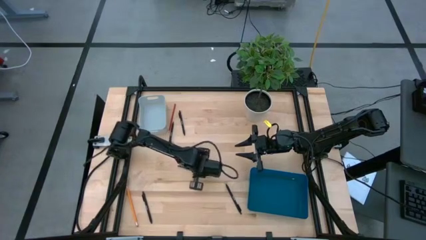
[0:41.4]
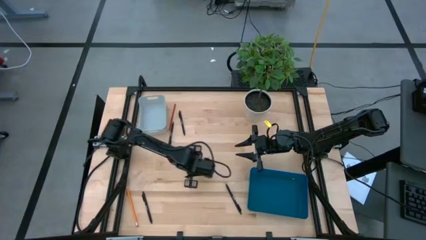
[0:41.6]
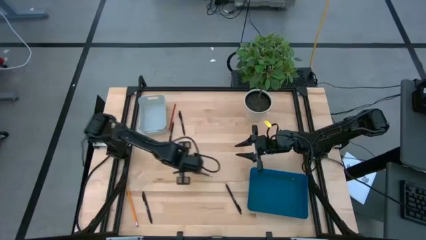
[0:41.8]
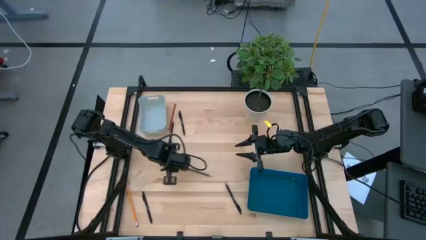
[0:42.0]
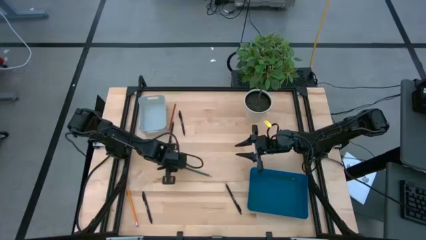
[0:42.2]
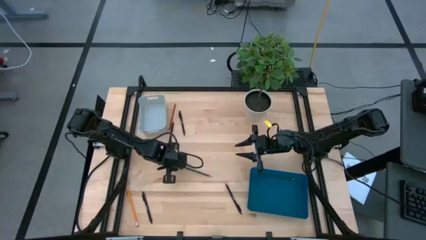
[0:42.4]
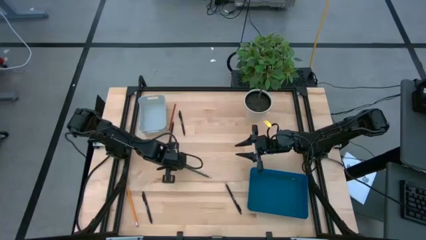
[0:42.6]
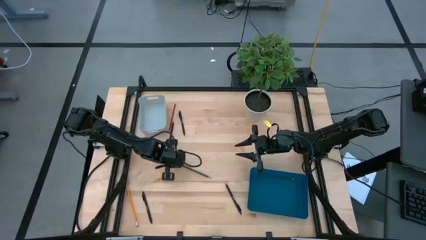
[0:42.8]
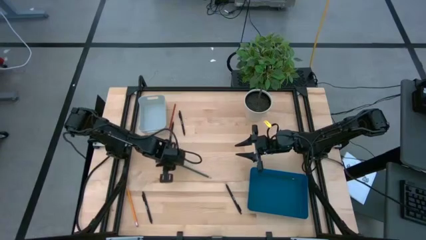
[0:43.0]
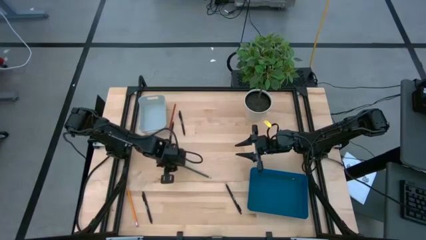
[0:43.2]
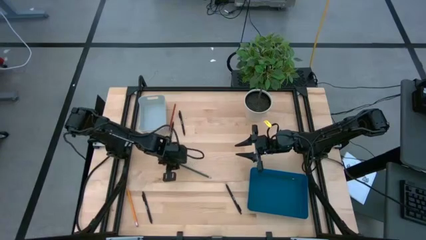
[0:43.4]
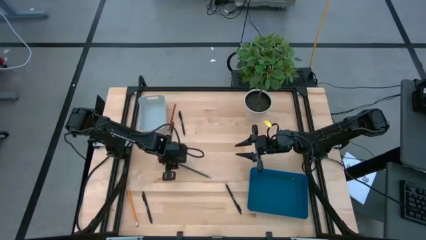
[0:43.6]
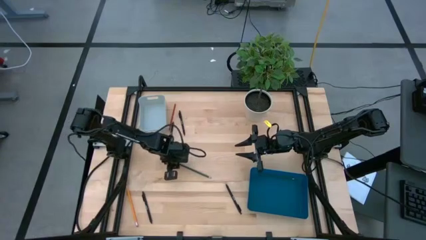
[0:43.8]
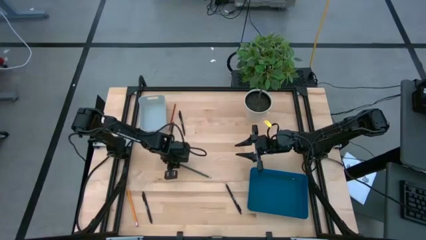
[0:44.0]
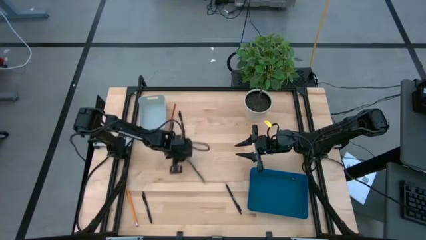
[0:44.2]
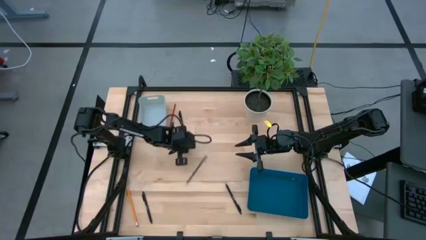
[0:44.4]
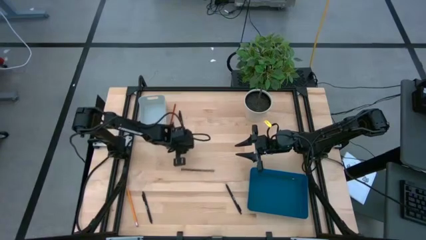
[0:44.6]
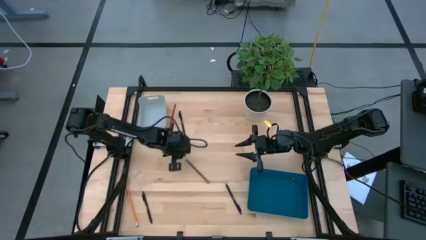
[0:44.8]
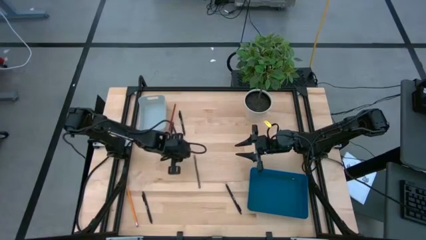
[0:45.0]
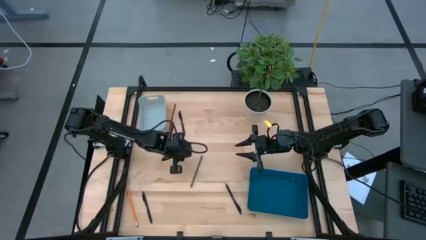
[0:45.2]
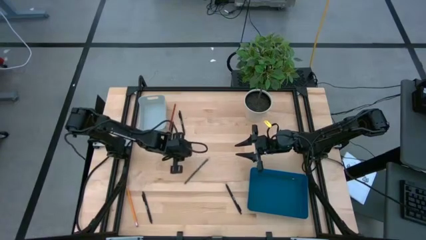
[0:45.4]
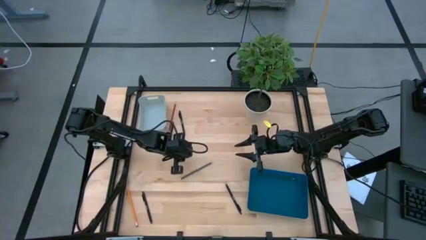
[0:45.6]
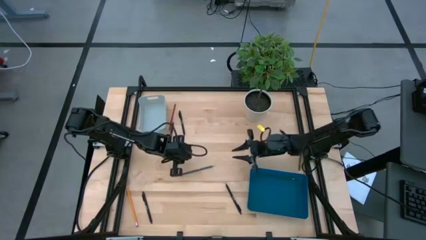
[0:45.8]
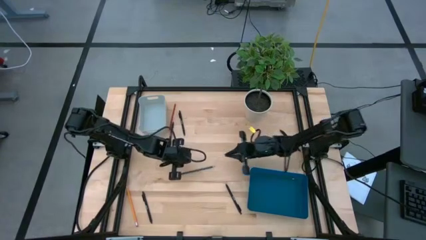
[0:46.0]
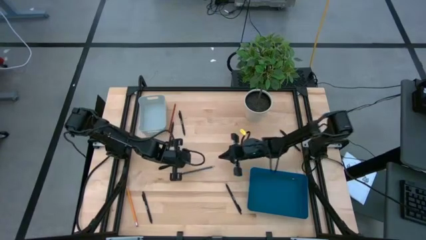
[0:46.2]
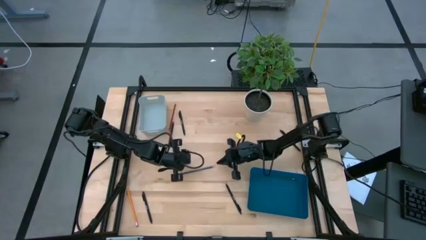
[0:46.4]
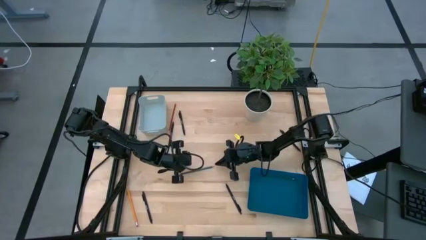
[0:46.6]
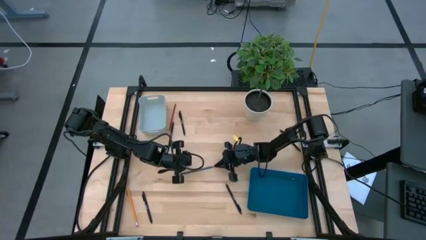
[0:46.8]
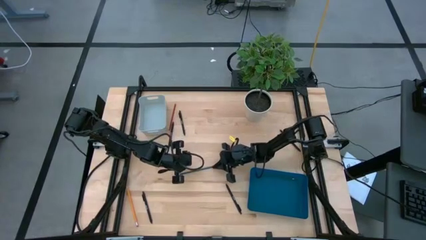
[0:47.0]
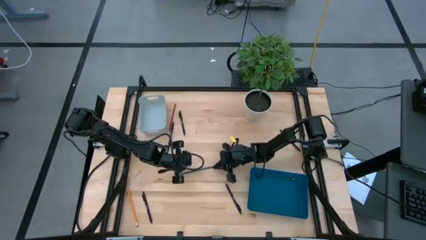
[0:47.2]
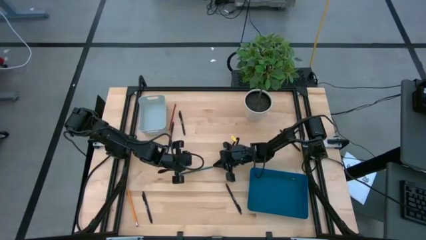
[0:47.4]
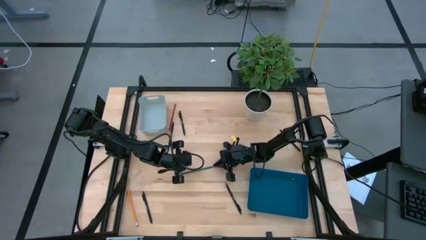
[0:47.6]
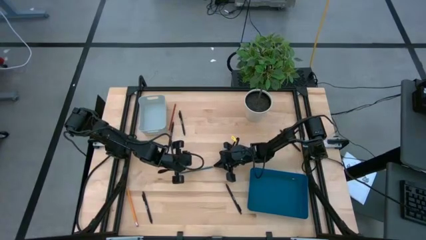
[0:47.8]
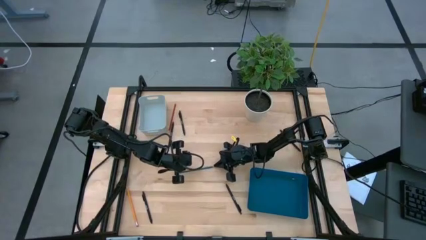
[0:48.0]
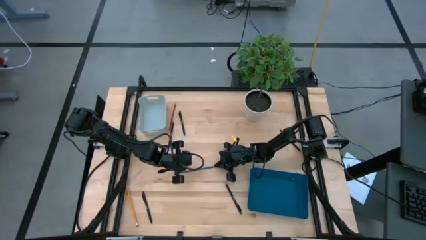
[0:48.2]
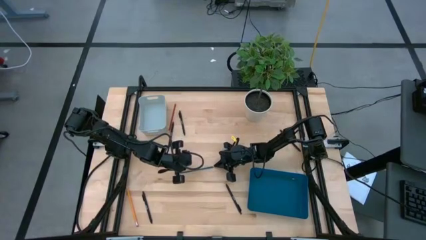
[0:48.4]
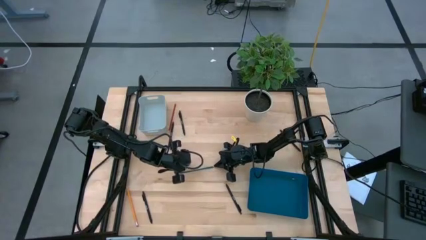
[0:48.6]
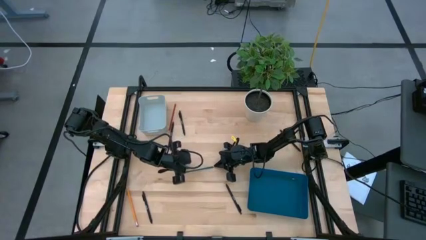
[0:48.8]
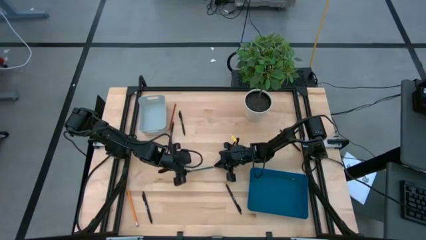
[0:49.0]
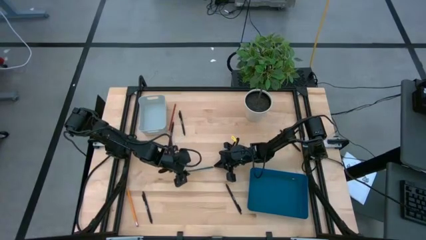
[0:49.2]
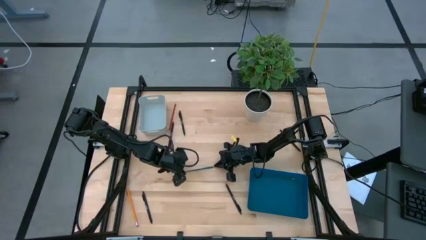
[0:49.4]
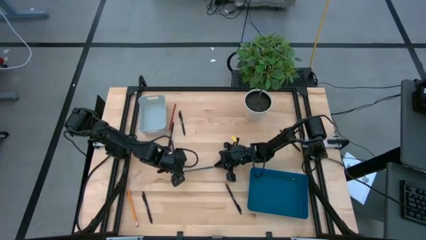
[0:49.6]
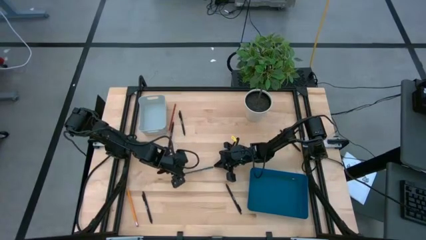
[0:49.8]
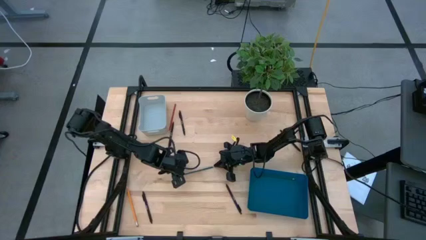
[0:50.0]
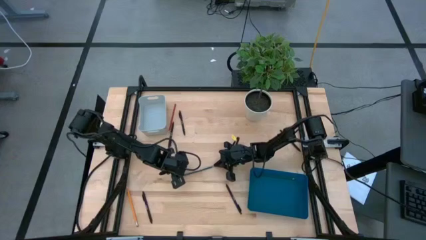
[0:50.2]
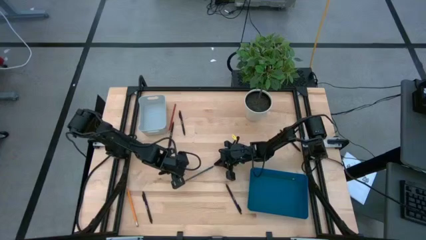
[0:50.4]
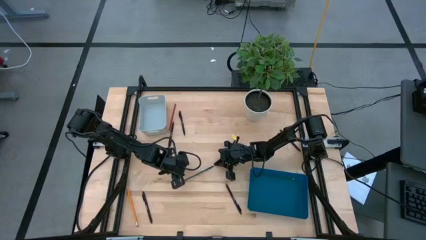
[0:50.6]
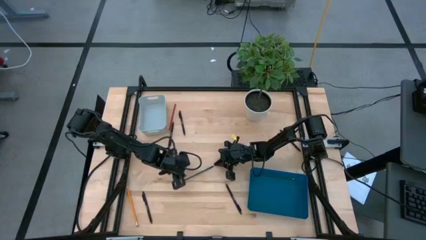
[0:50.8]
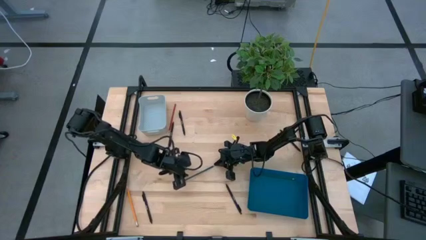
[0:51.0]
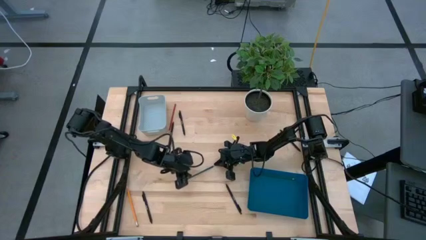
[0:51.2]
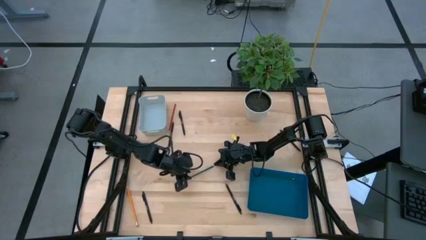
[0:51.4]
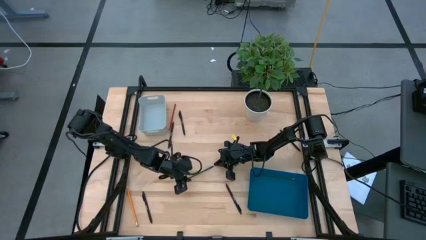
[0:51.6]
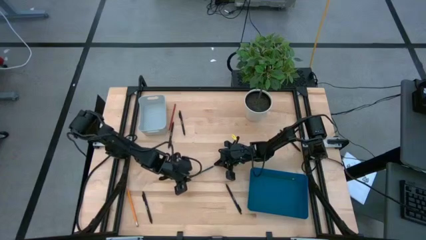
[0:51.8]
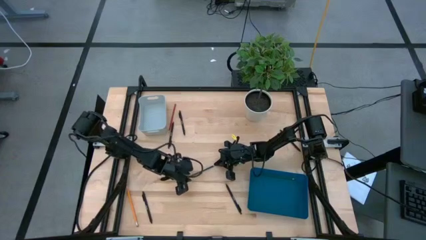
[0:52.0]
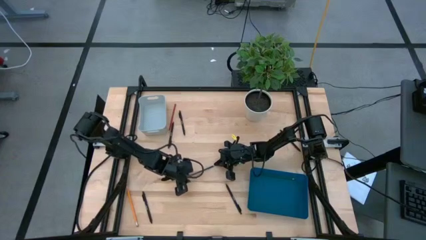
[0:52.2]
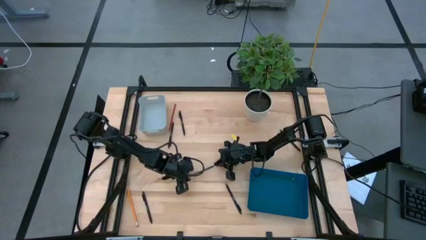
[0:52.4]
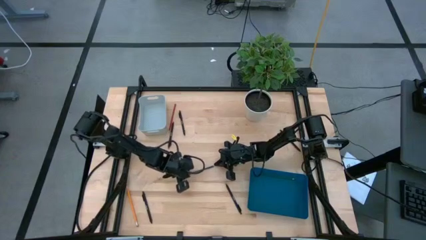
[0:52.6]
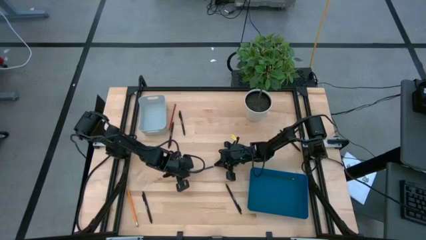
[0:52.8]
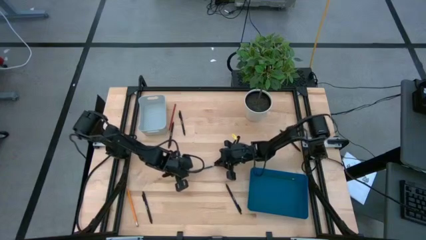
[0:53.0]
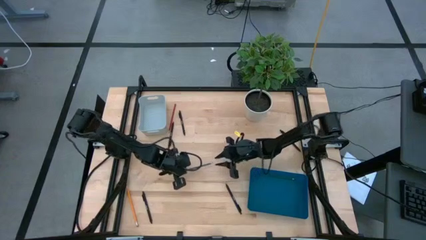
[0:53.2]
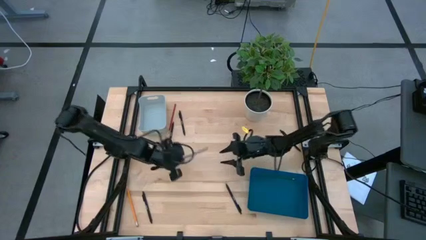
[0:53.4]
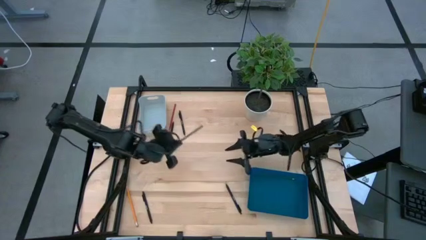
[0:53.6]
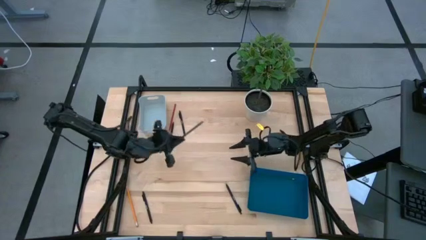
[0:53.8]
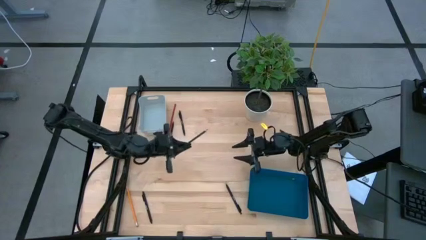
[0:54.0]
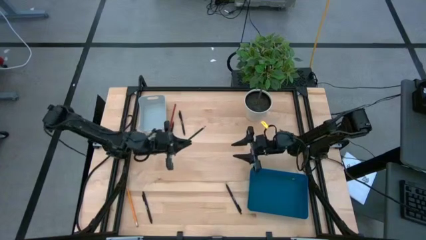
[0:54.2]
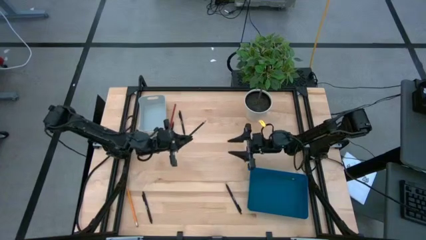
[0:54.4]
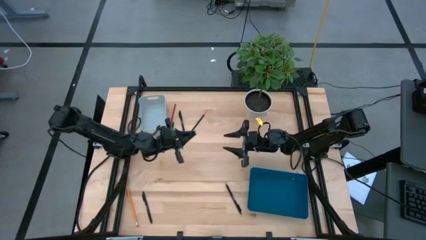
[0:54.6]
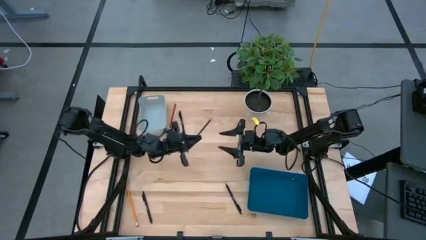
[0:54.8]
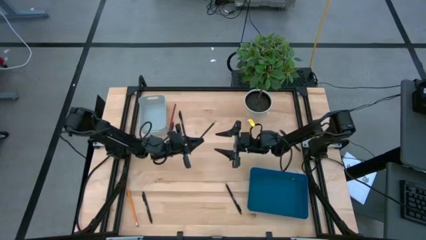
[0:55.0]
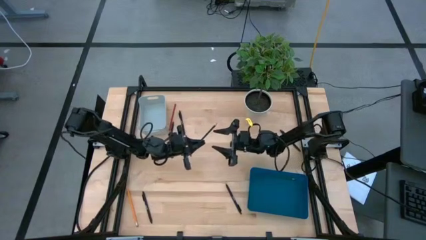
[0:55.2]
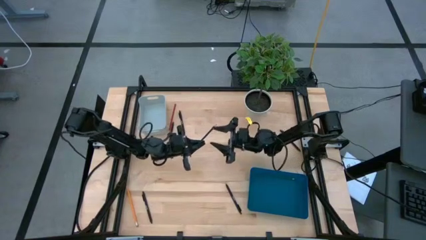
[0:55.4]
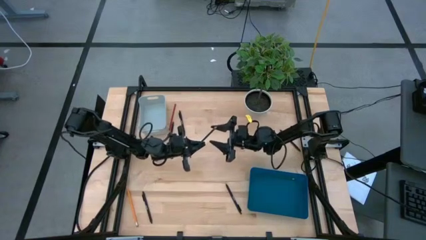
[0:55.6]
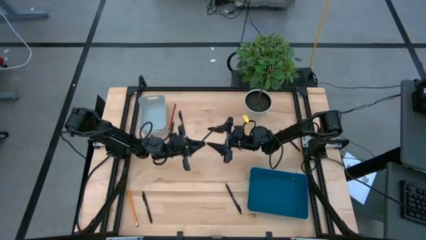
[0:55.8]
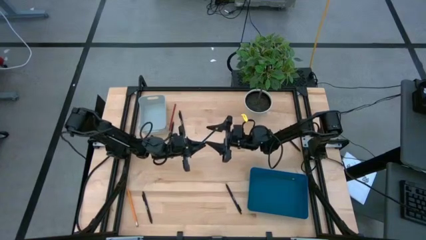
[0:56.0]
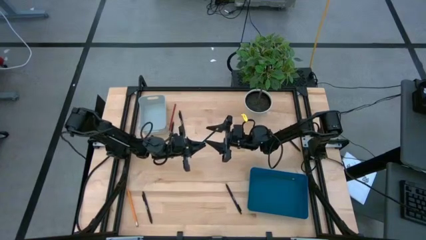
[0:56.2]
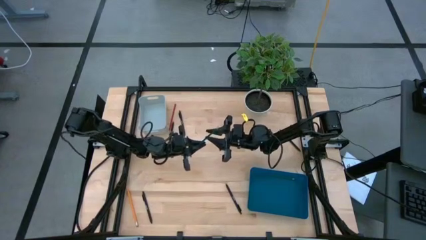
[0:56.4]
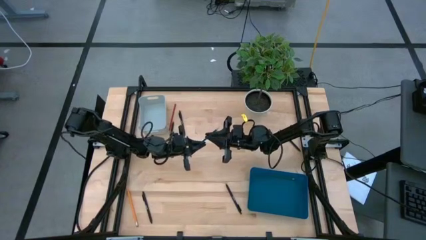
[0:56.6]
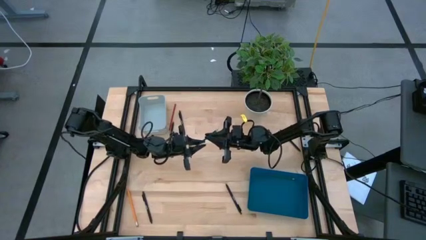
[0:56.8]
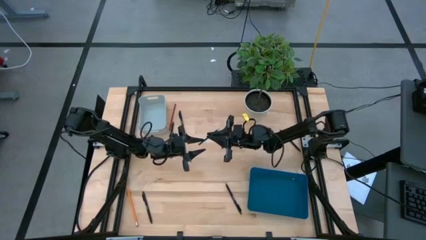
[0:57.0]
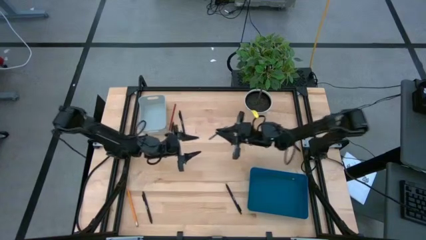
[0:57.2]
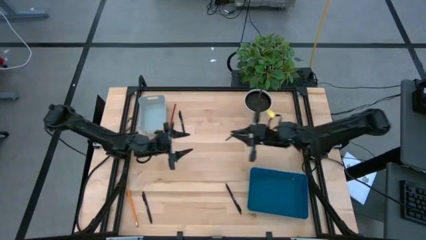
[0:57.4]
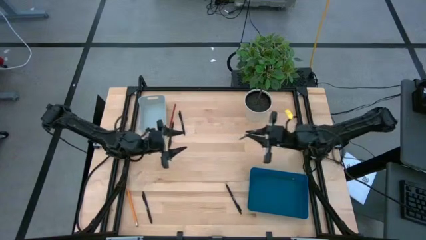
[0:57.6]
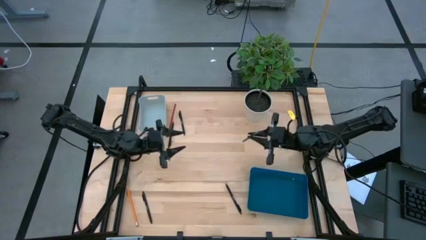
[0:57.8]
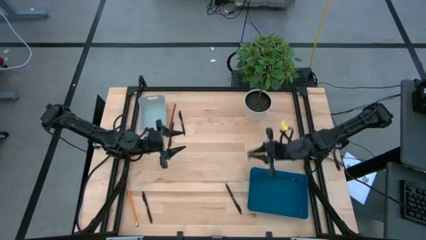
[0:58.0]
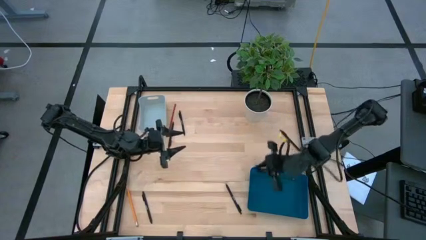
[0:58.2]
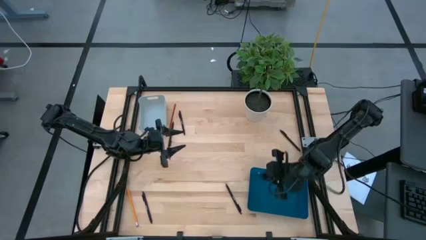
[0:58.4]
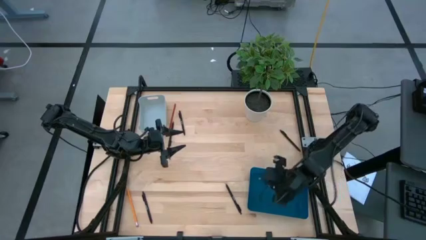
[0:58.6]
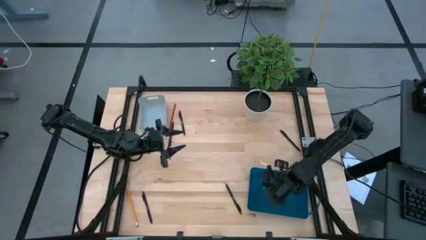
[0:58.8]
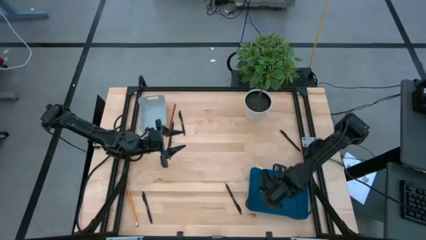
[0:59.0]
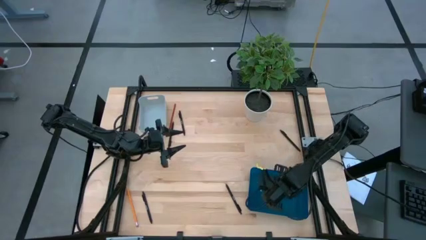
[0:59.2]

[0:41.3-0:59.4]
Task: Sort pens & pencils
Put the green pencil into the blue bin
